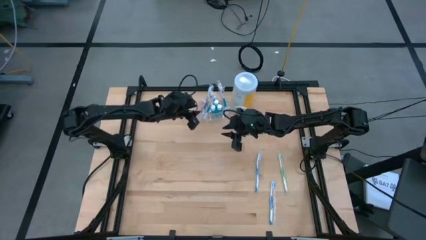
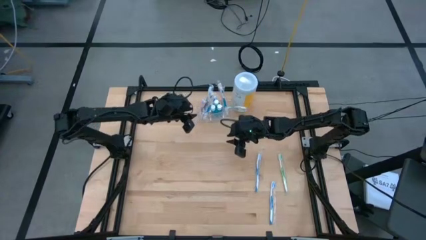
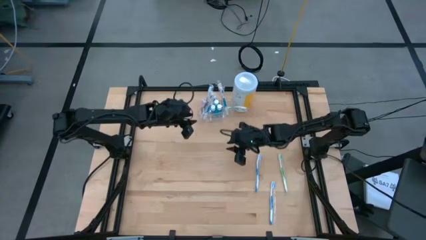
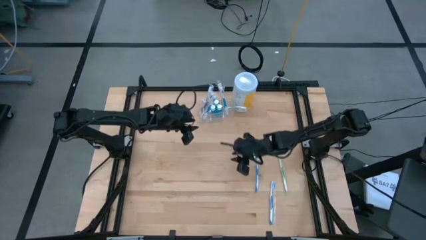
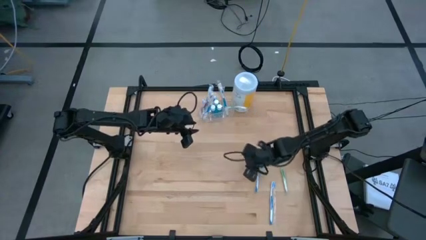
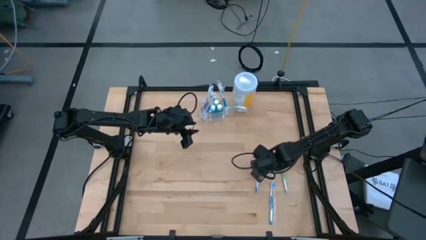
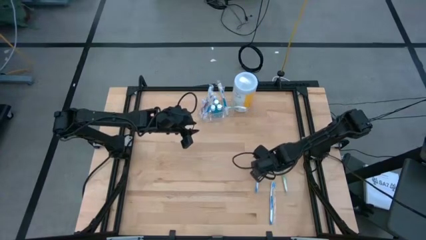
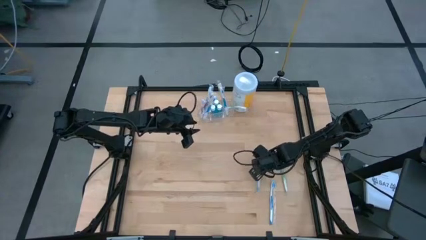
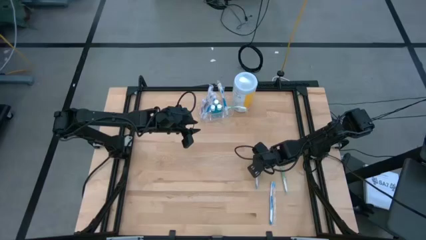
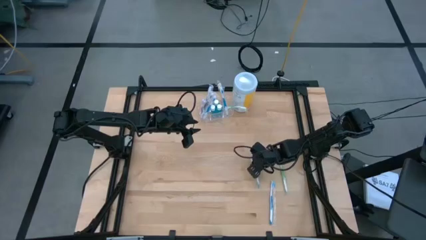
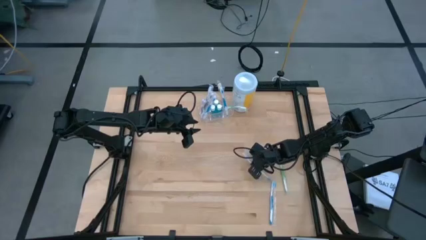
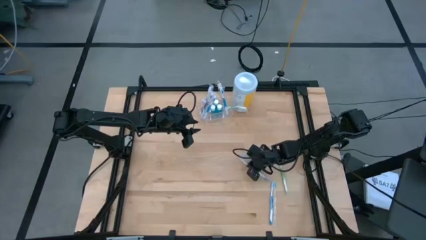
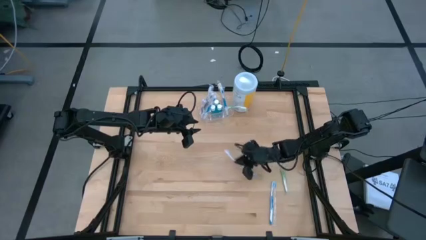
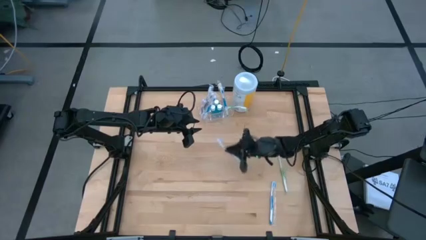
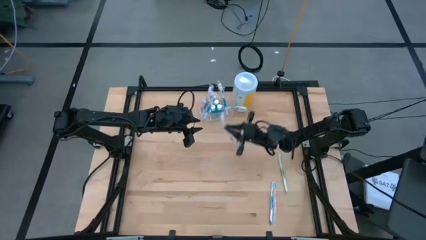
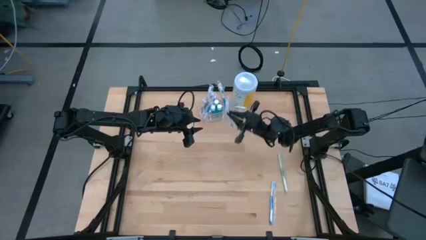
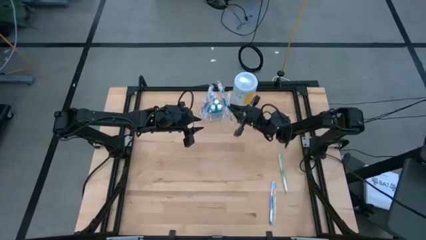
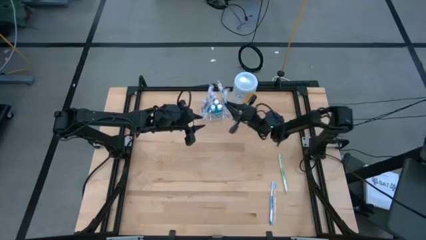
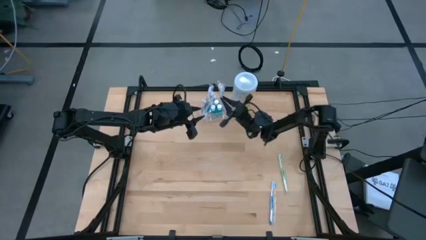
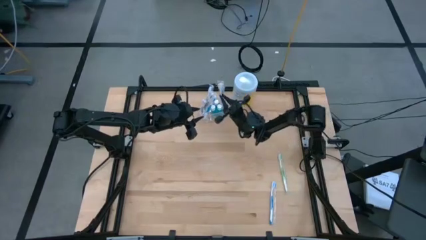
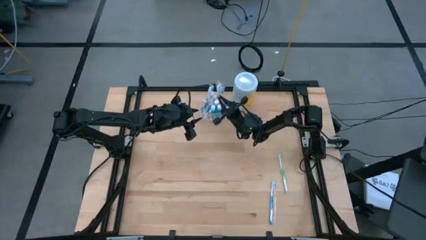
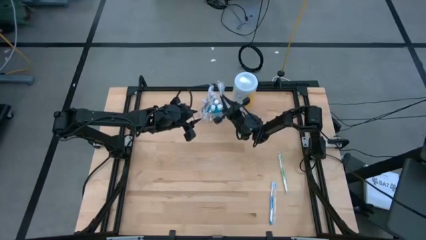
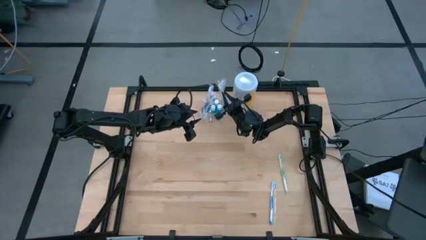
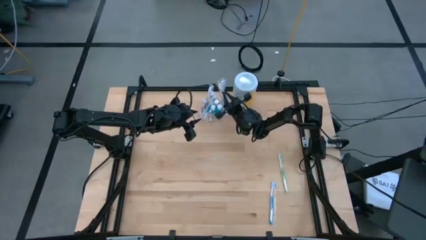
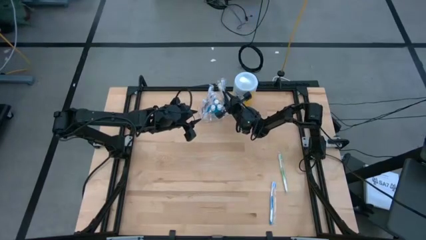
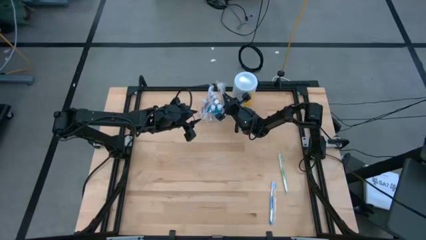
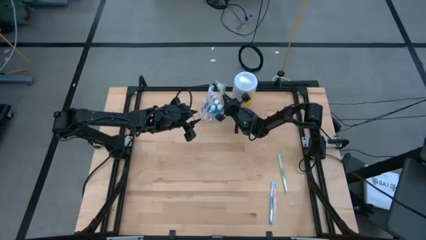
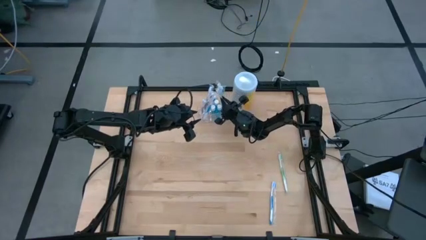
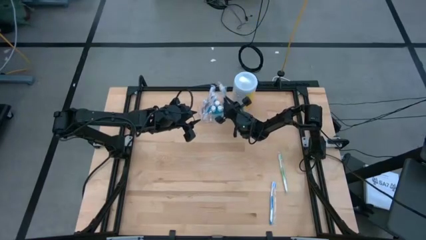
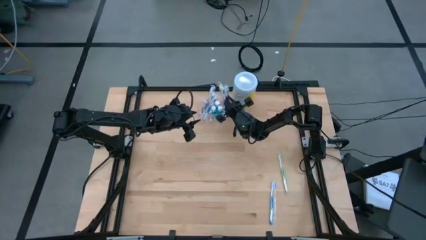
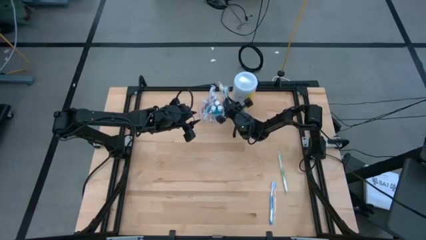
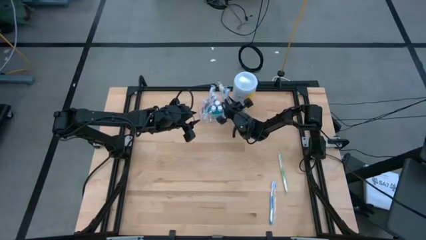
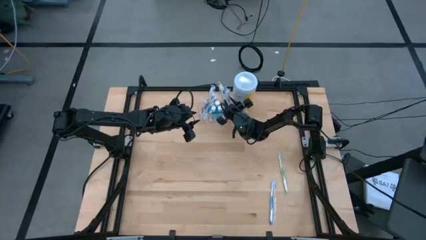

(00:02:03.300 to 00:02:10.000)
Task: Pick & Place toothbrushing station
Put the blue toothbrush into the transparent organizer

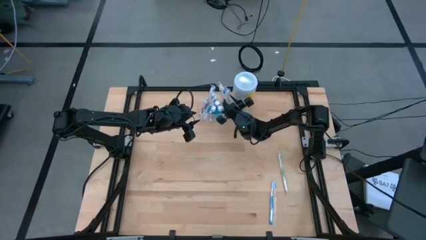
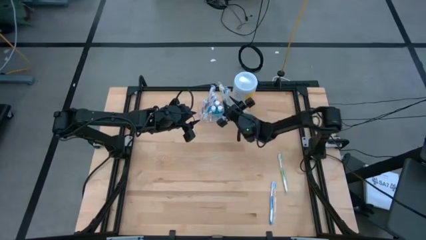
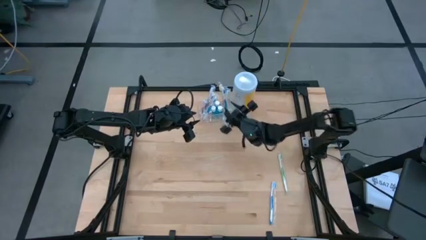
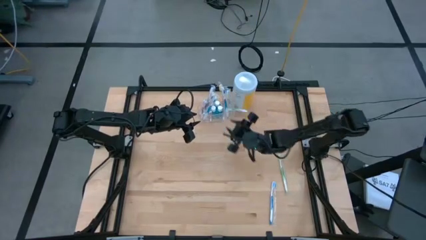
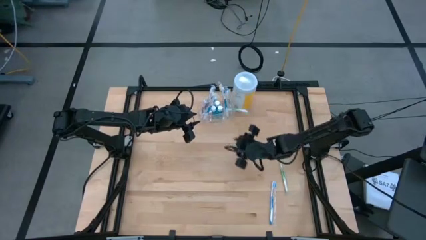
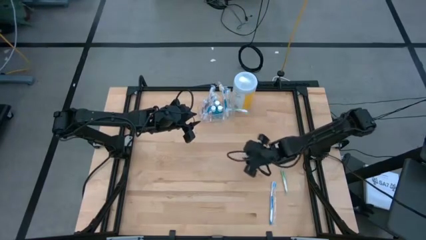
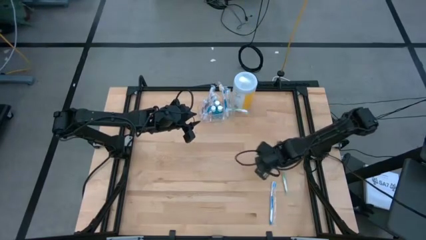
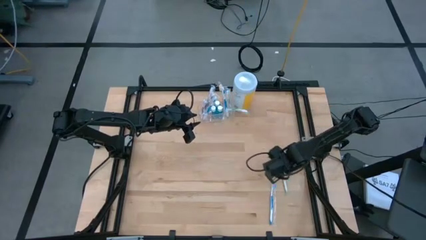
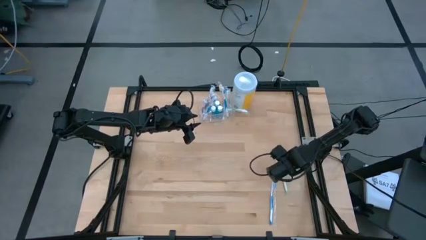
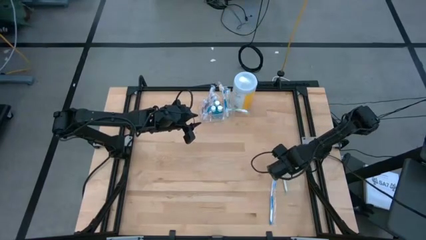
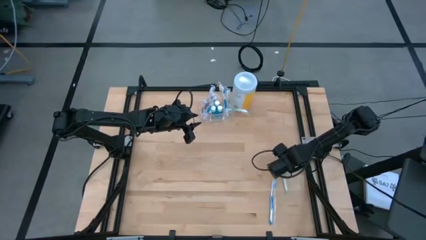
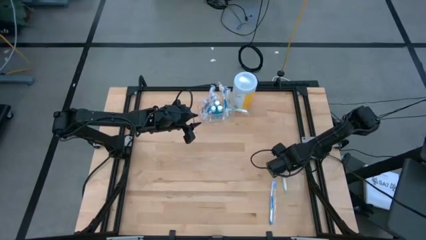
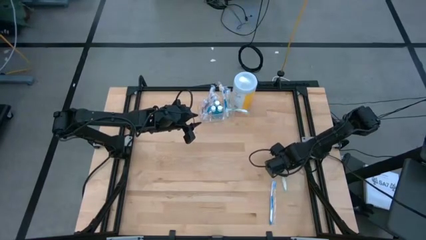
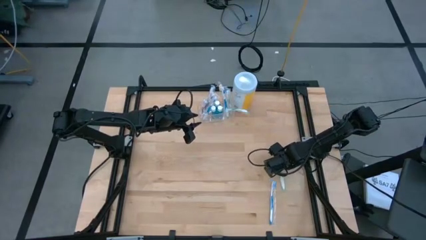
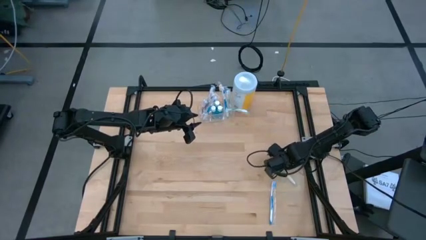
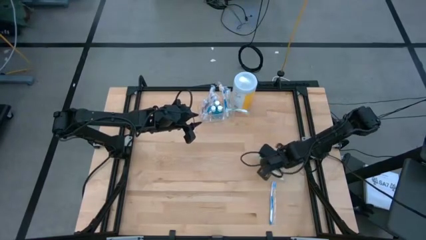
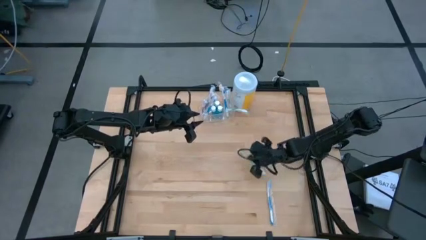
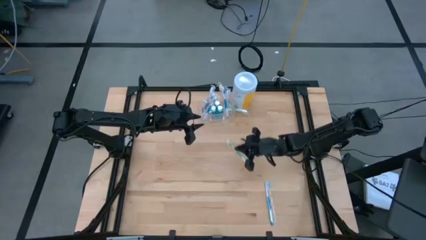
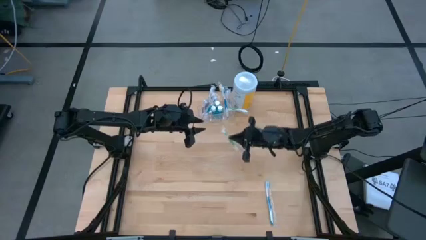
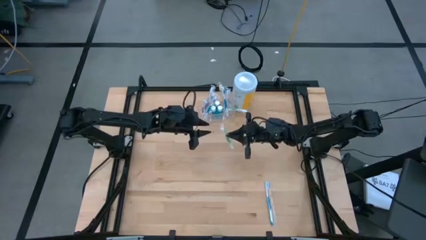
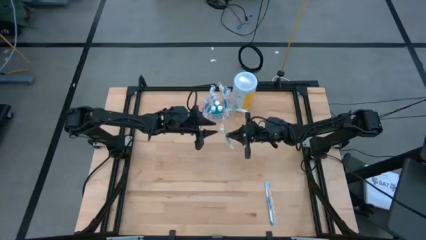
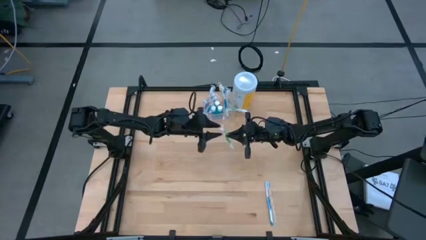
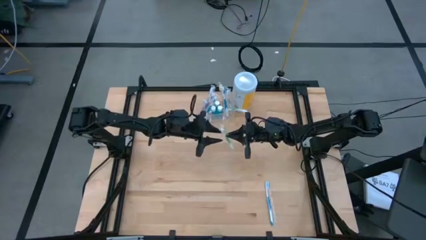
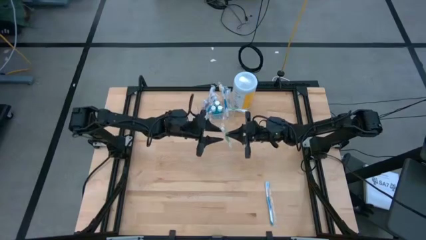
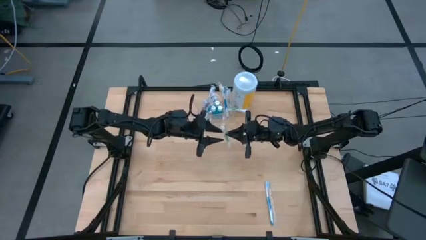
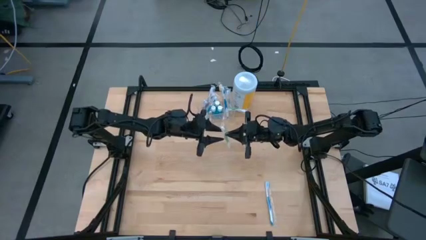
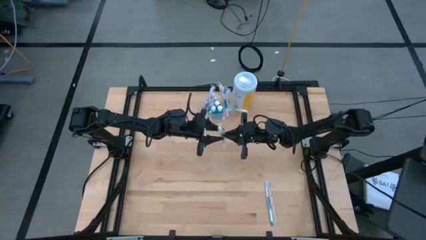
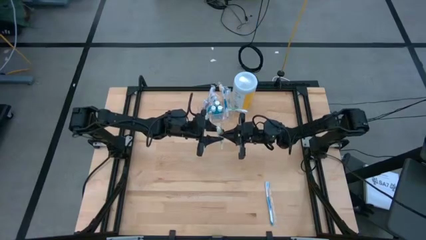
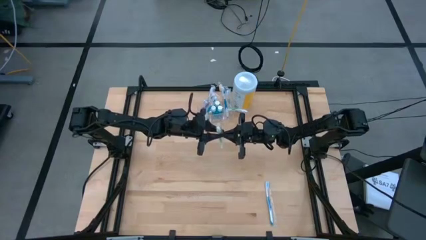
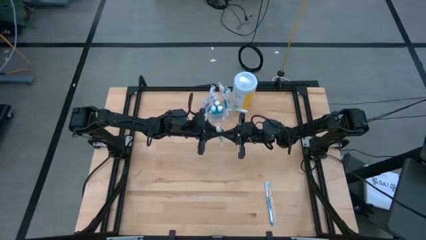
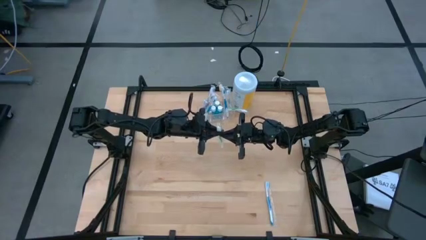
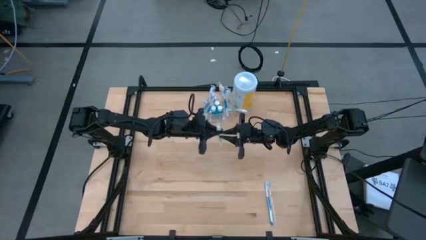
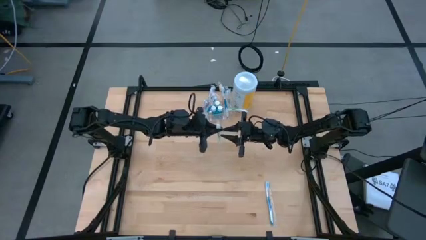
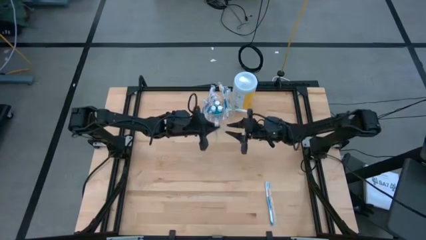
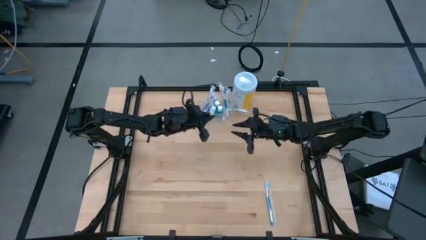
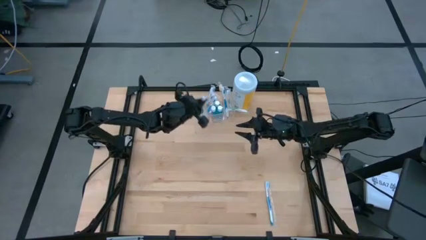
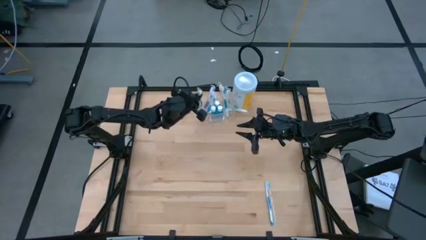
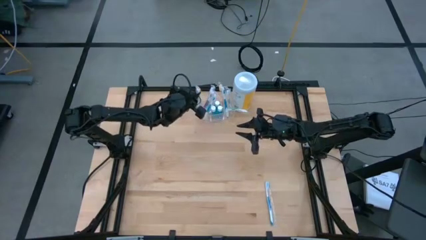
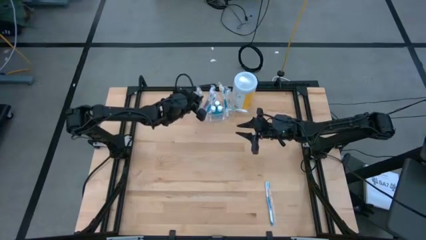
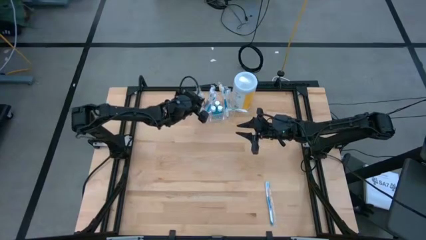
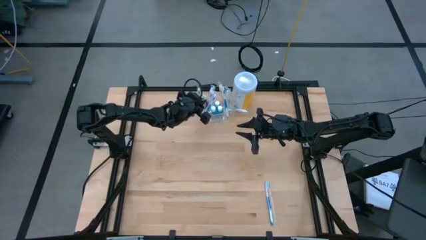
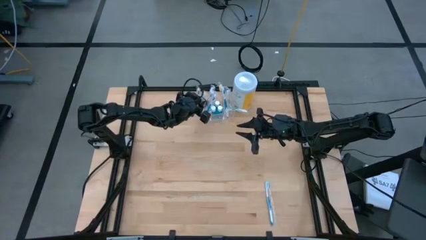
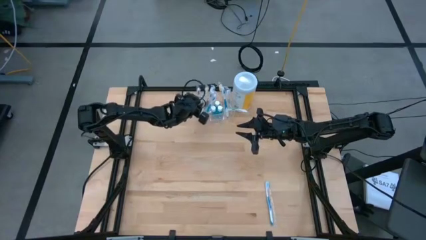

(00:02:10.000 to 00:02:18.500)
Put the green toothbrush into the transparent organizer
